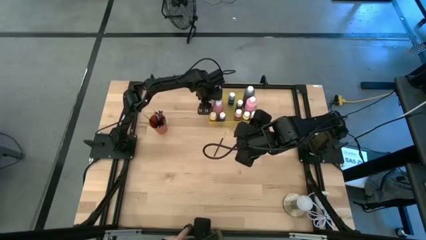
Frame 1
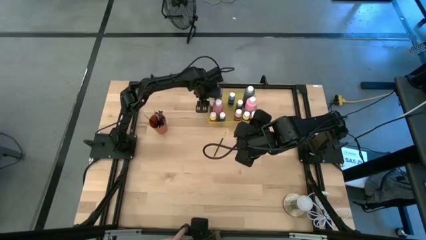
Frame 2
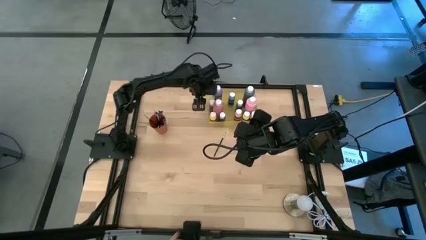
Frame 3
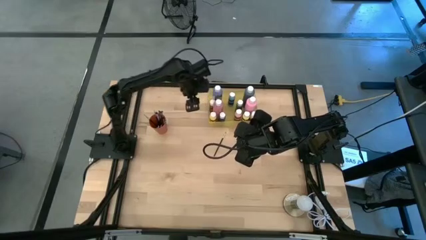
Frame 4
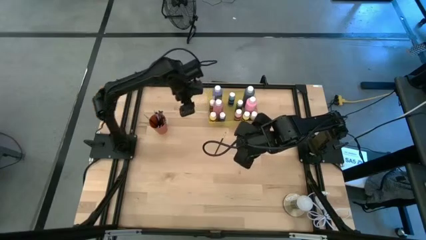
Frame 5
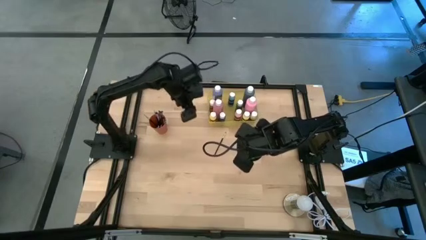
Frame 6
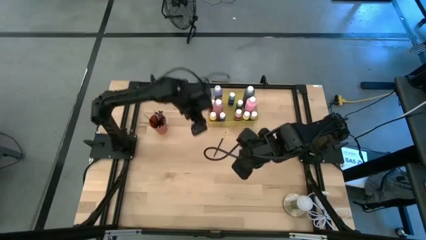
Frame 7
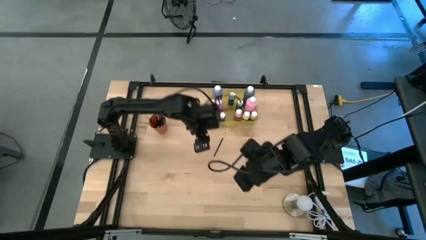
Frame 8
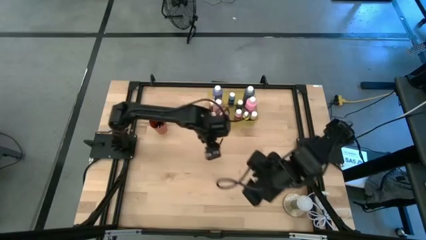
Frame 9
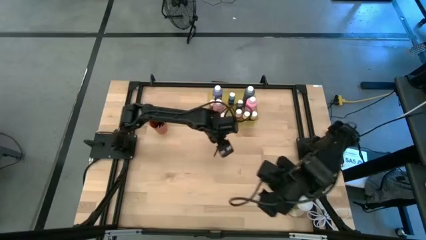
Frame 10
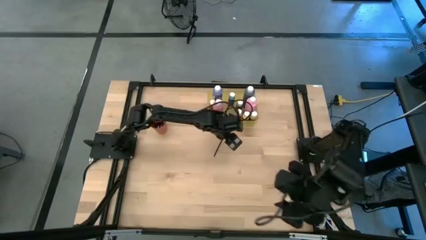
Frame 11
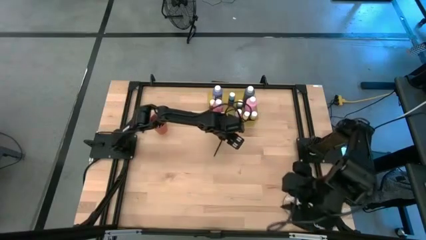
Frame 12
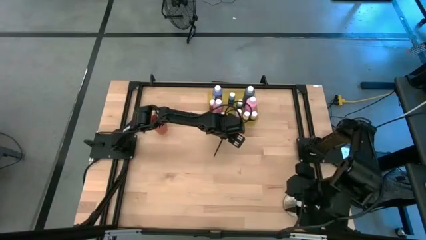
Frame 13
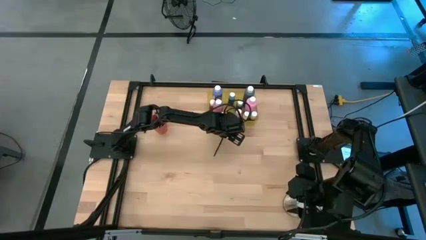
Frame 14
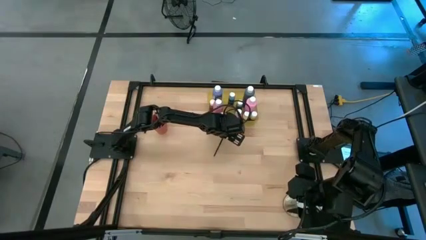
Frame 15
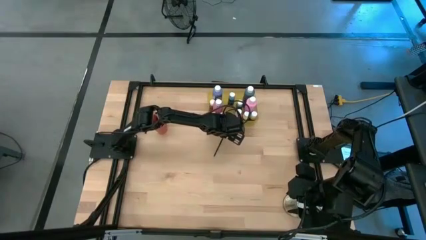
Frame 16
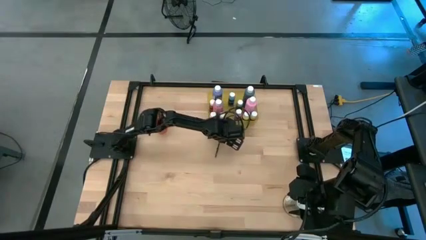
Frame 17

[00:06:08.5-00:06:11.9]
Task: Pick & Place Paint Supplies
Put the silver paint brush into the orange cup

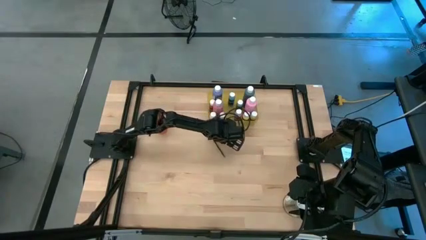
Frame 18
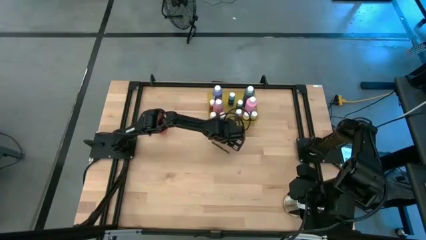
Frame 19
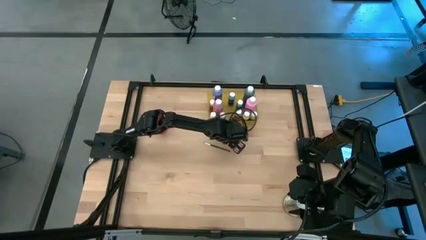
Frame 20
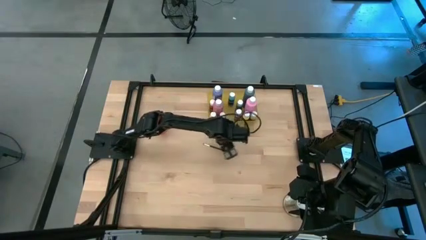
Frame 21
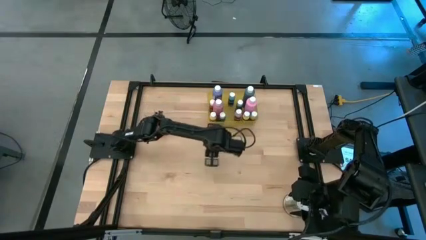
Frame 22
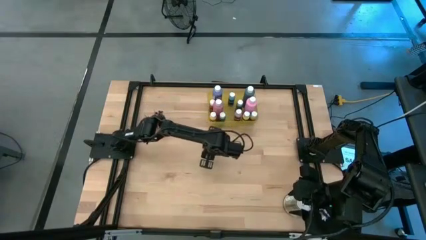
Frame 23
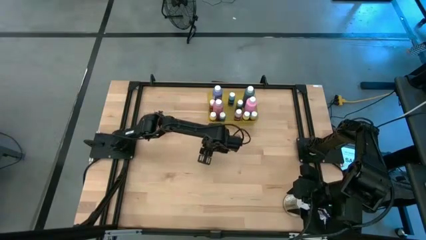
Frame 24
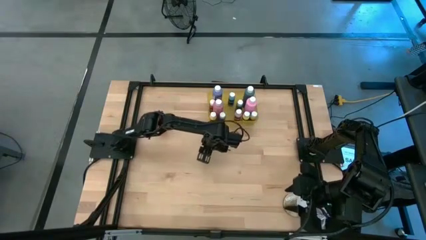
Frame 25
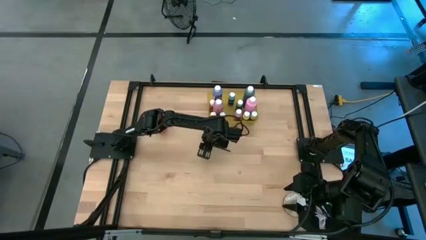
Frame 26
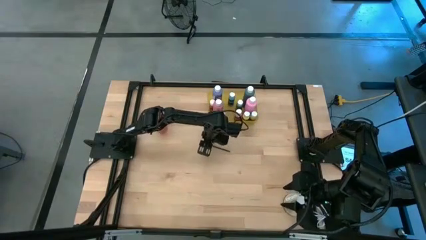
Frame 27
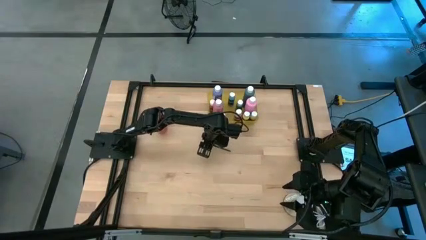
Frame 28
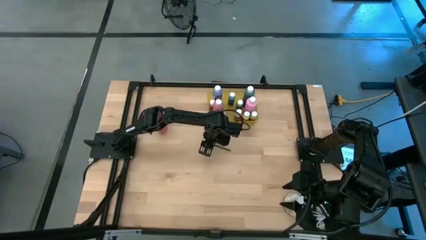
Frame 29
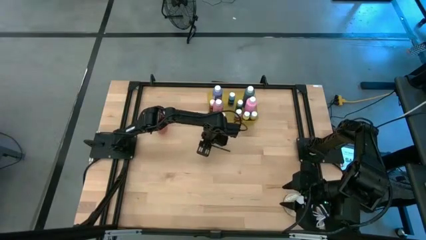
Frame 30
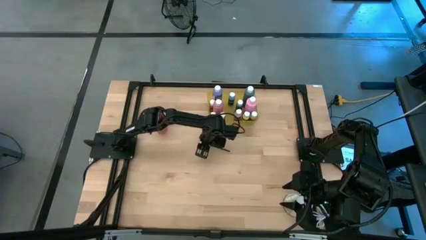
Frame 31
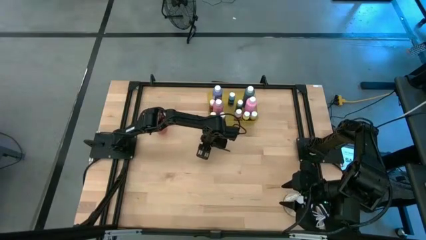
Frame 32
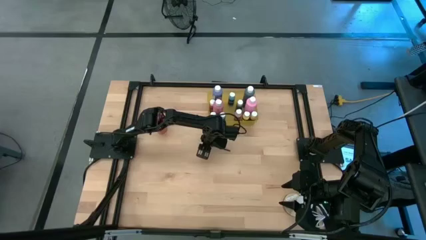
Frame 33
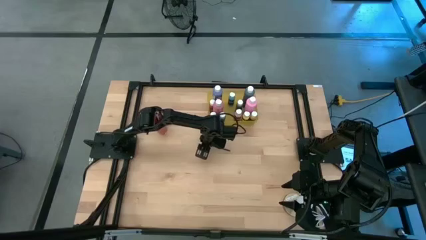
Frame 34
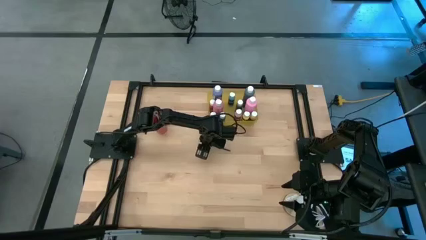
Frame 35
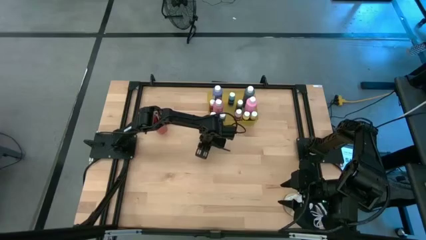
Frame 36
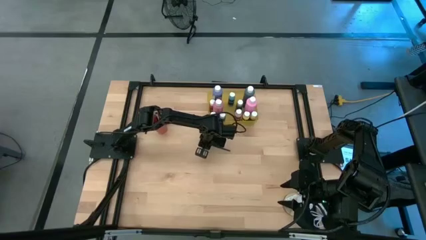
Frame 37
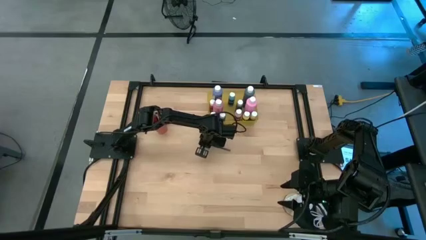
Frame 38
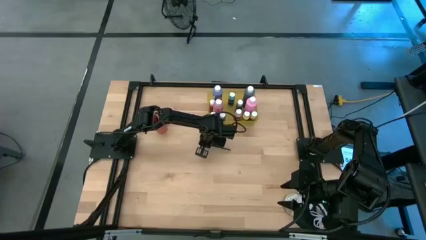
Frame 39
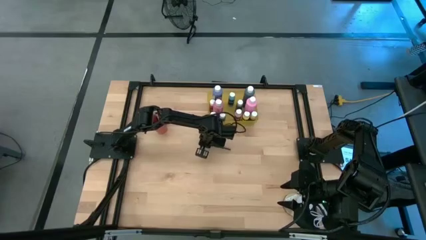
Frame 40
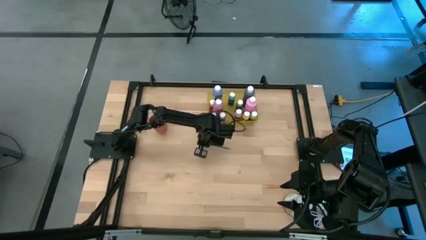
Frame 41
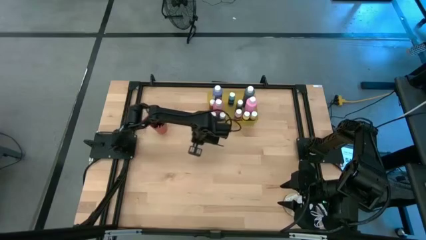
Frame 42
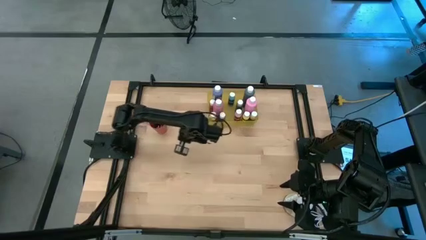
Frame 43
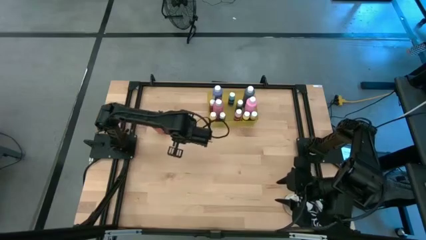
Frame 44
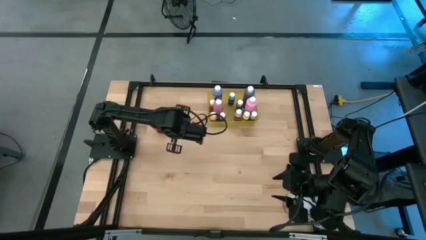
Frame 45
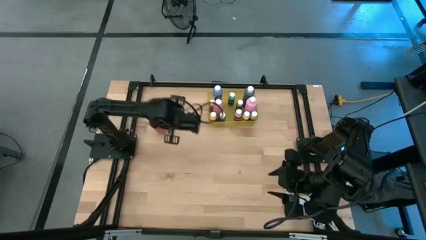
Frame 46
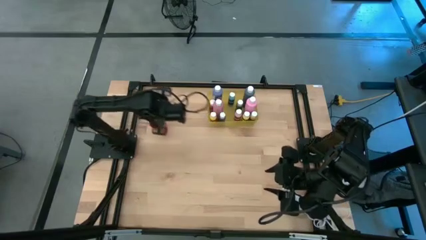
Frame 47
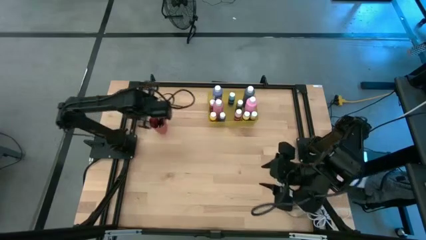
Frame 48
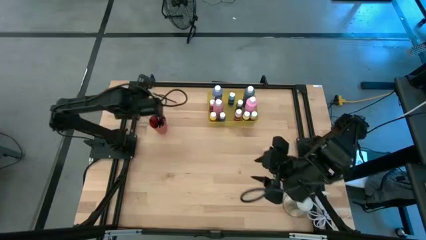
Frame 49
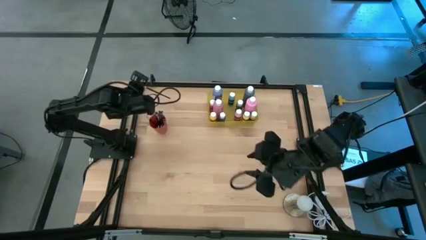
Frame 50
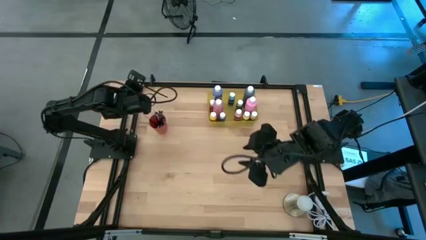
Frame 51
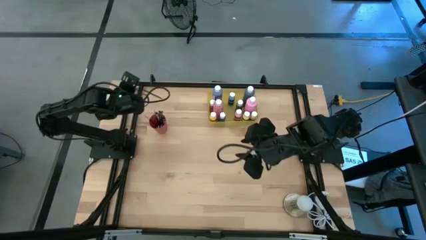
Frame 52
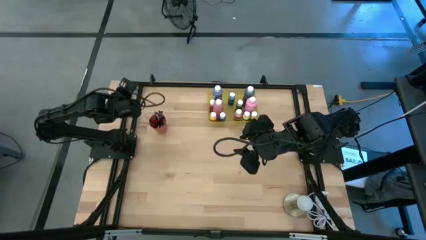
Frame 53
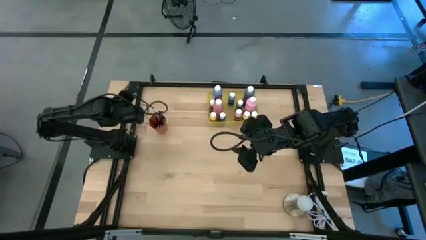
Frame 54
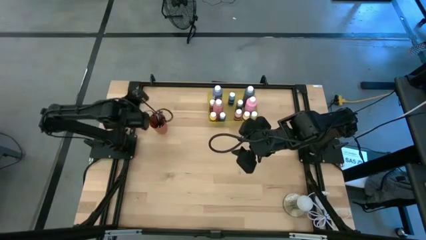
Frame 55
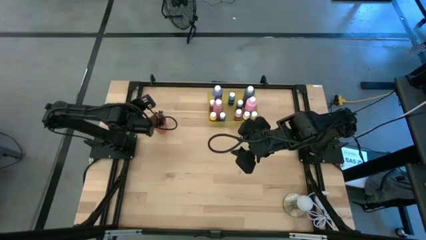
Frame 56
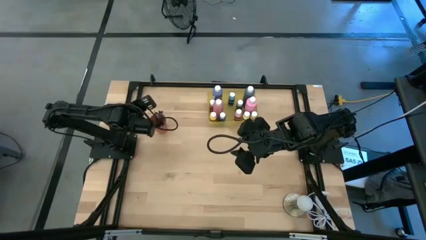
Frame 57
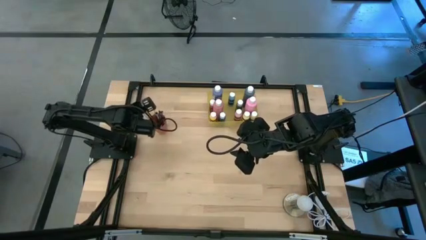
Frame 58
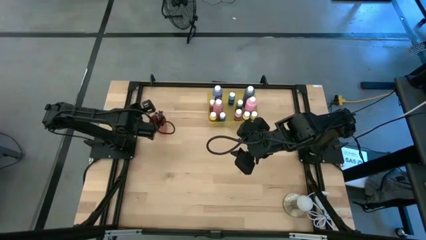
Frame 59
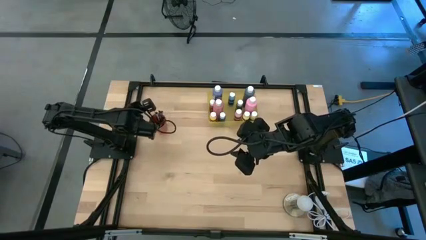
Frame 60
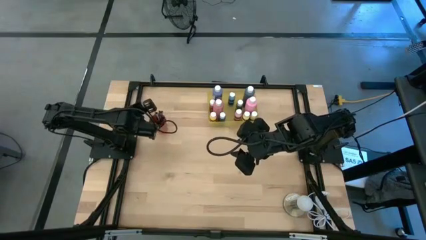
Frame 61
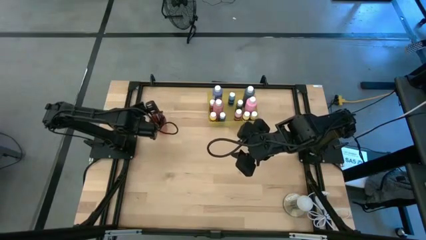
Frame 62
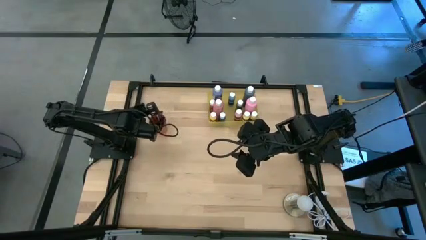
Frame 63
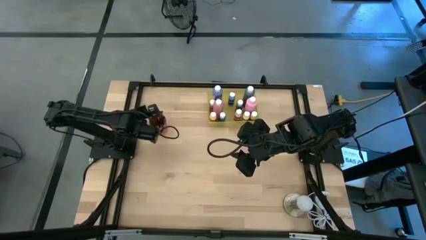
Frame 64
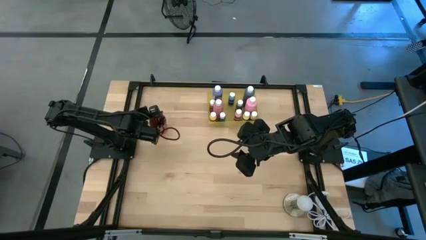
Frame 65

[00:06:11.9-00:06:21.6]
Put the silver paint brush into the orange cup

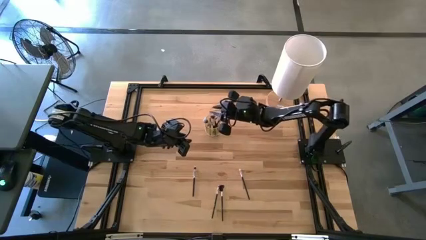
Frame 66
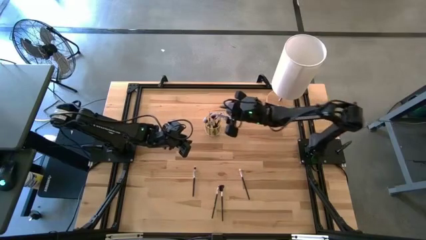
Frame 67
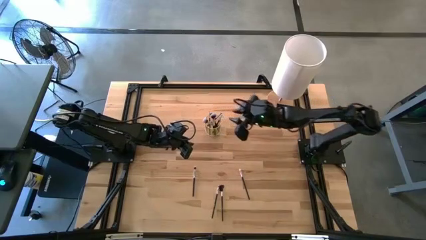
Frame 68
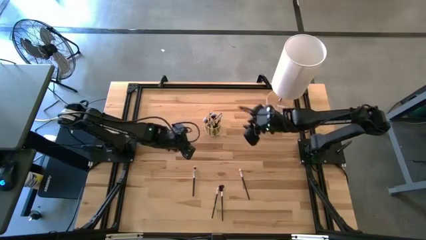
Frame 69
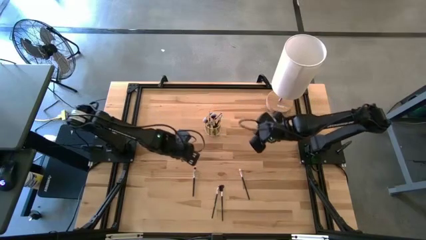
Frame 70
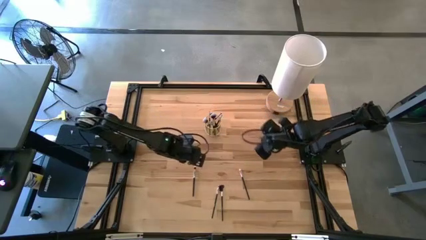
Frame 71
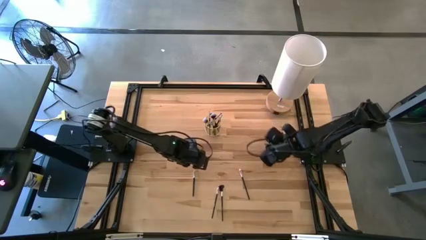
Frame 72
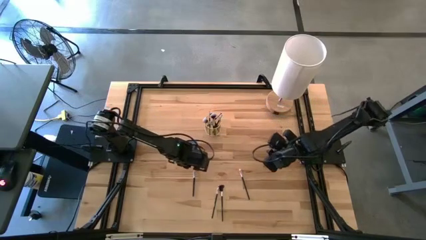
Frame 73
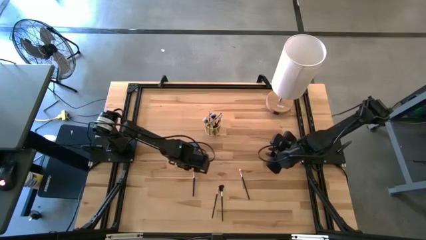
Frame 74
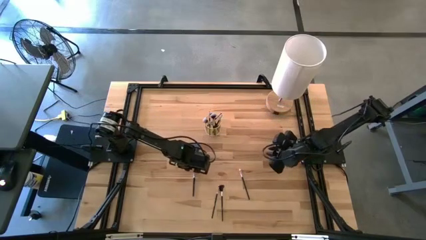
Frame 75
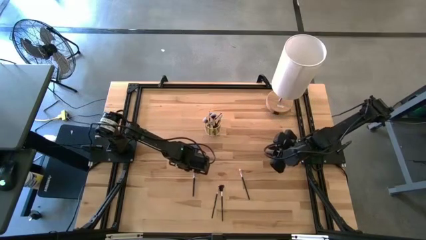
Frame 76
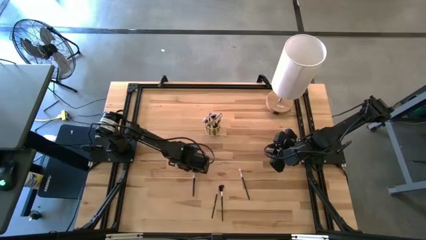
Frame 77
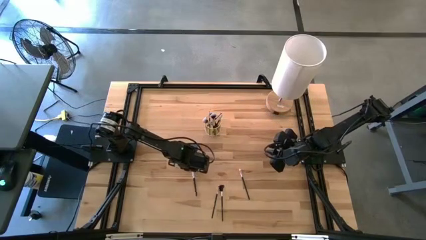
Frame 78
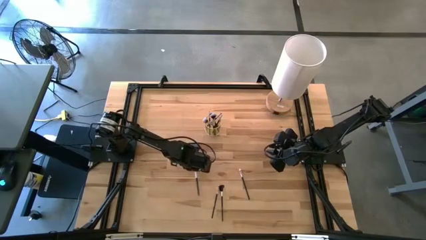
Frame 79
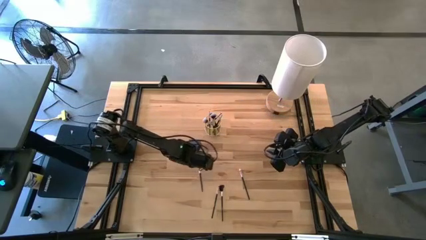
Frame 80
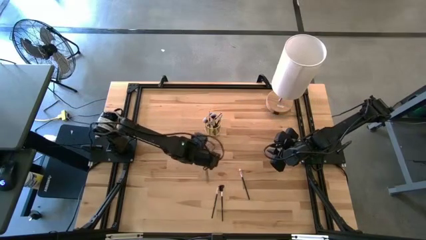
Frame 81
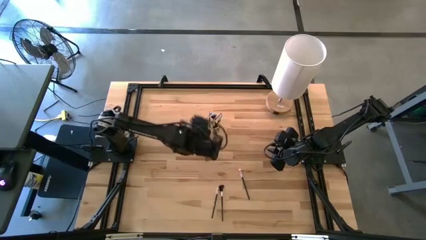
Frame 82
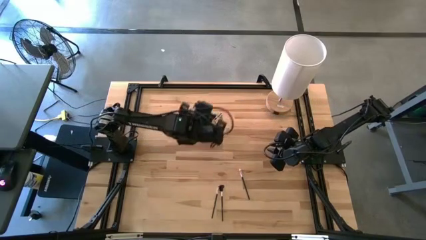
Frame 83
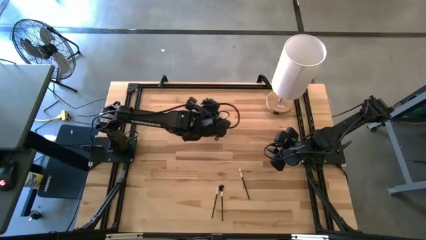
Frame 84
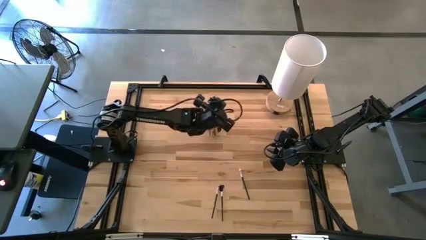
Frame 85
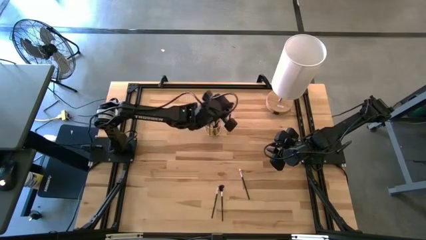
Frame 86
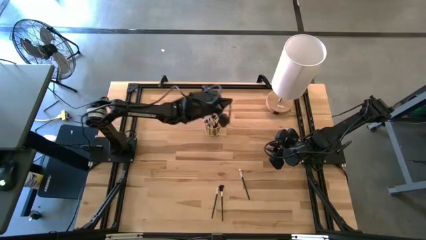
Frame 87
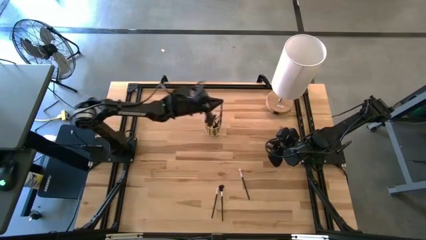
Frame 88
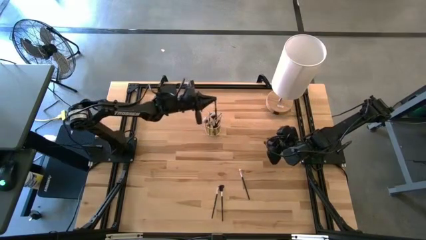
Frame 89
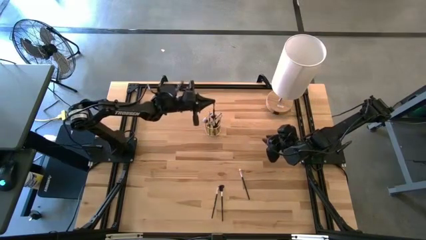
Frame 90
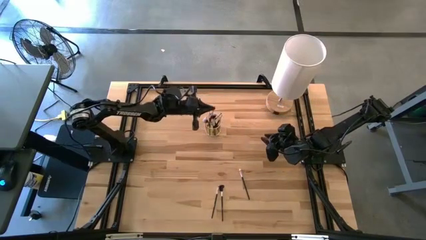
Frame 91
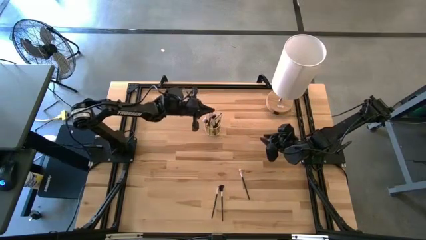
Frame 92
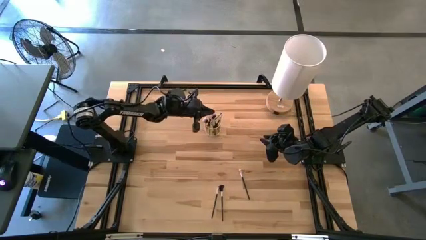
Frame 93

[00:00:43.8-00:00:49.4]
Task: Put items in baskets/containers
Put the black eyeshadow brush into the gold container
